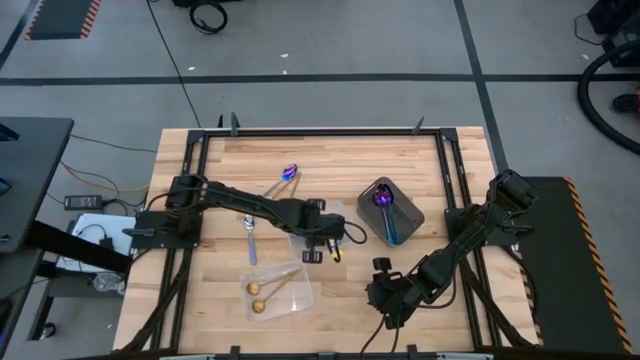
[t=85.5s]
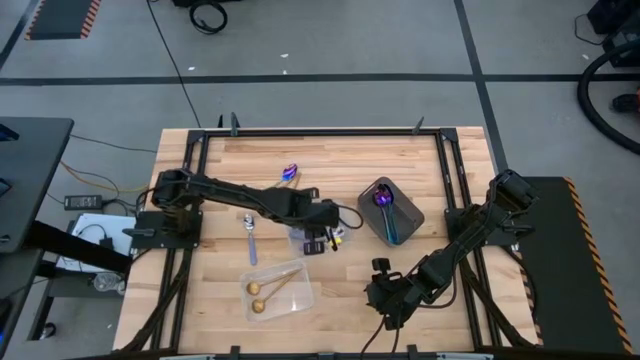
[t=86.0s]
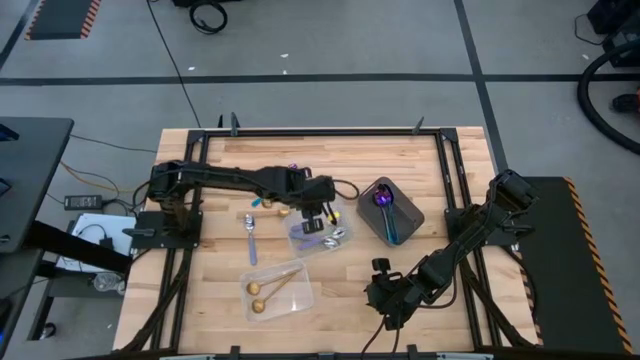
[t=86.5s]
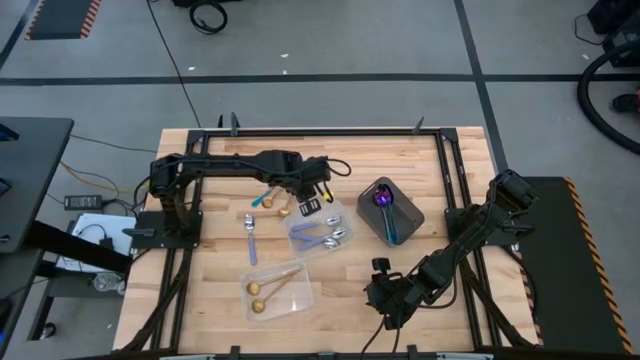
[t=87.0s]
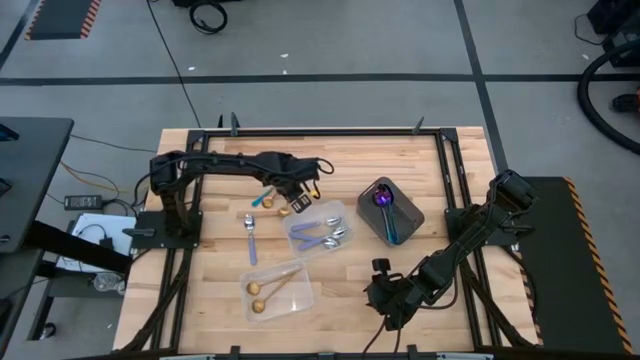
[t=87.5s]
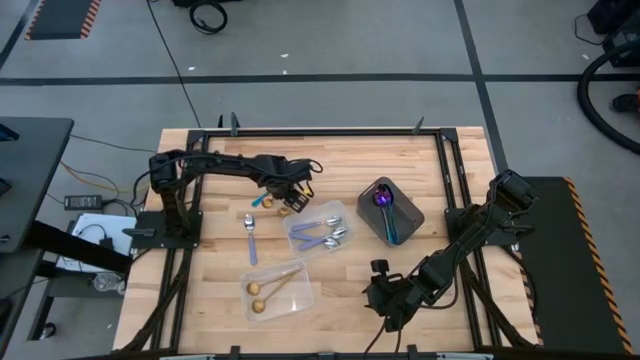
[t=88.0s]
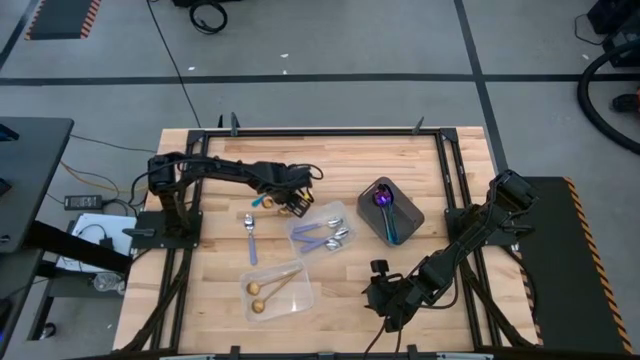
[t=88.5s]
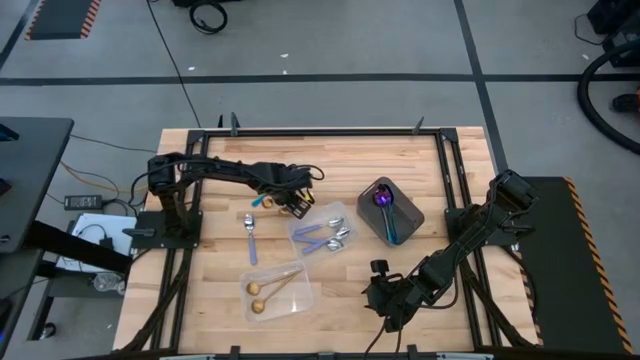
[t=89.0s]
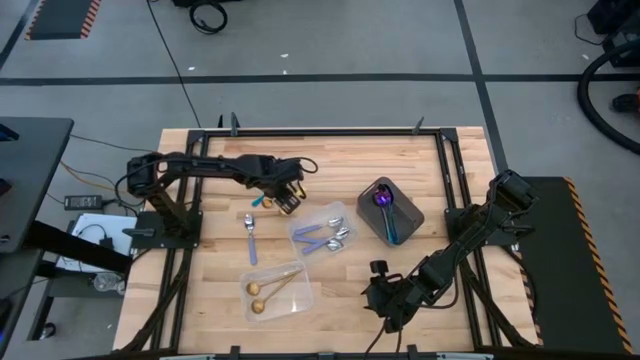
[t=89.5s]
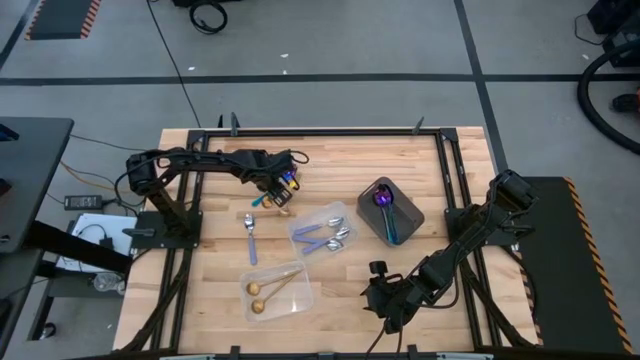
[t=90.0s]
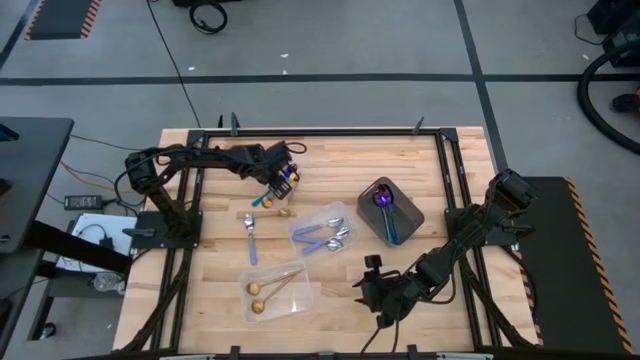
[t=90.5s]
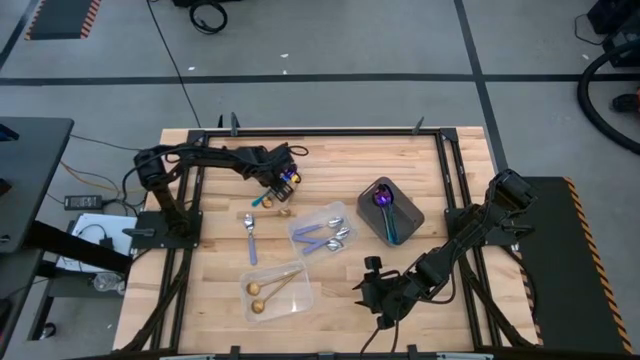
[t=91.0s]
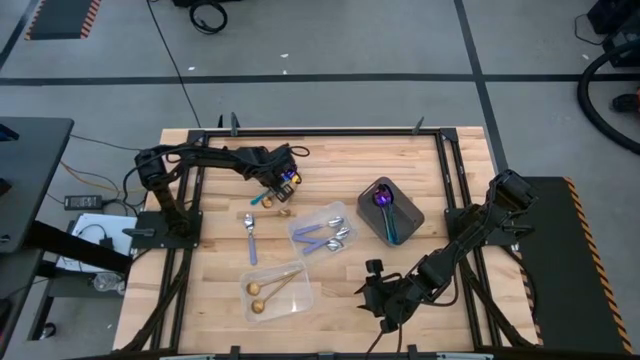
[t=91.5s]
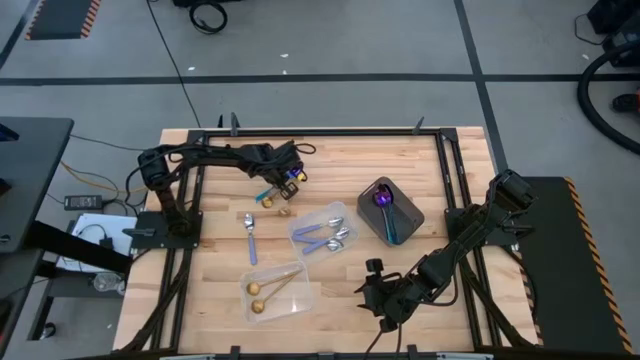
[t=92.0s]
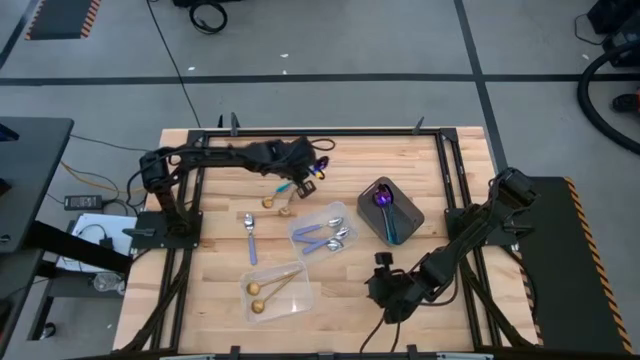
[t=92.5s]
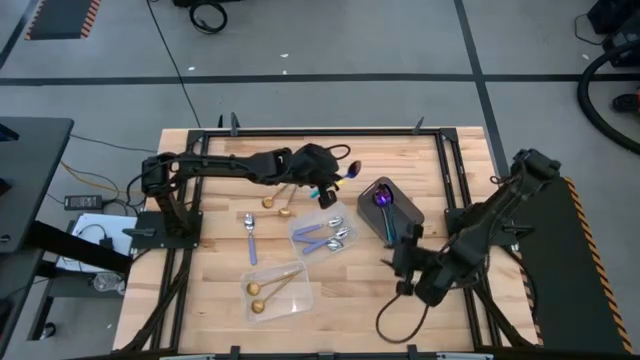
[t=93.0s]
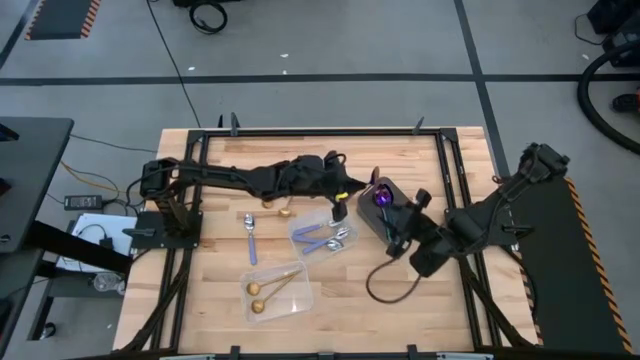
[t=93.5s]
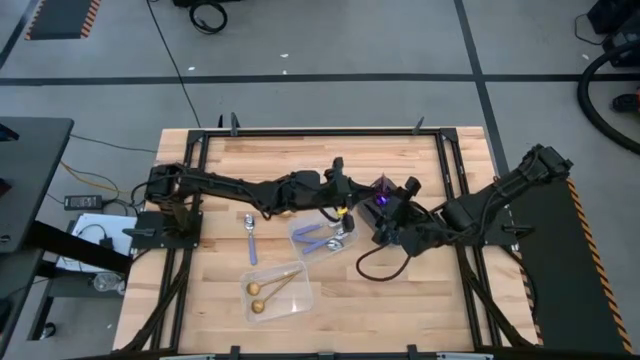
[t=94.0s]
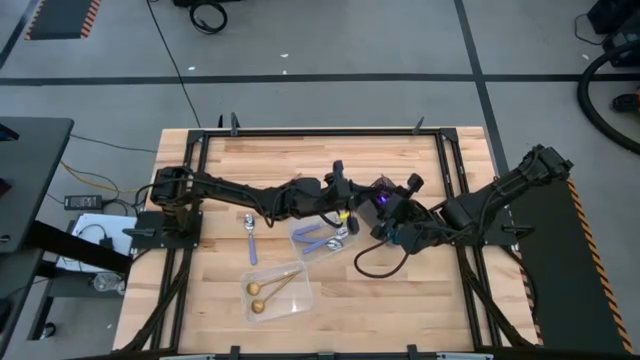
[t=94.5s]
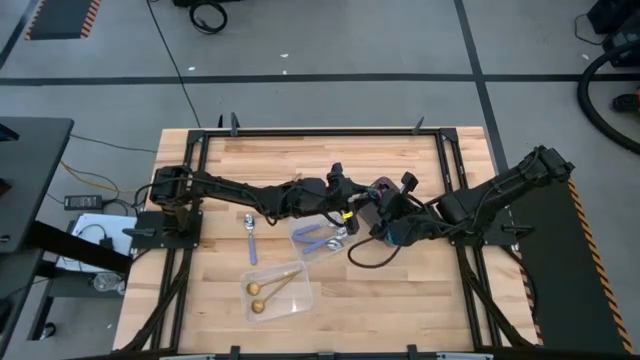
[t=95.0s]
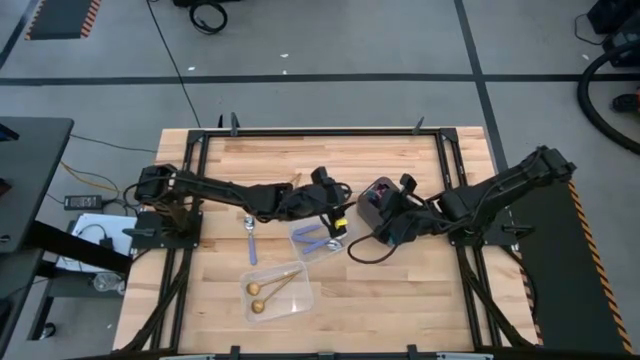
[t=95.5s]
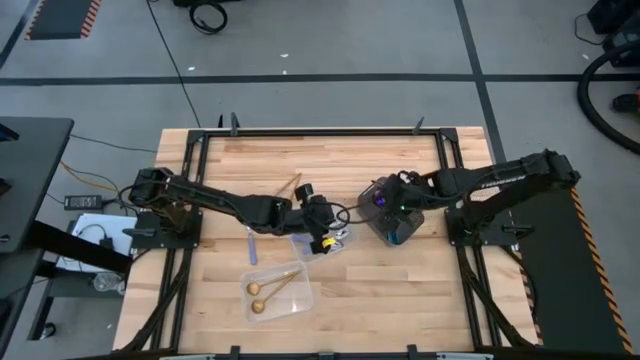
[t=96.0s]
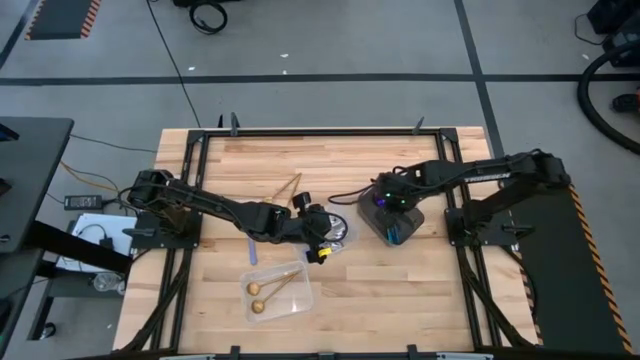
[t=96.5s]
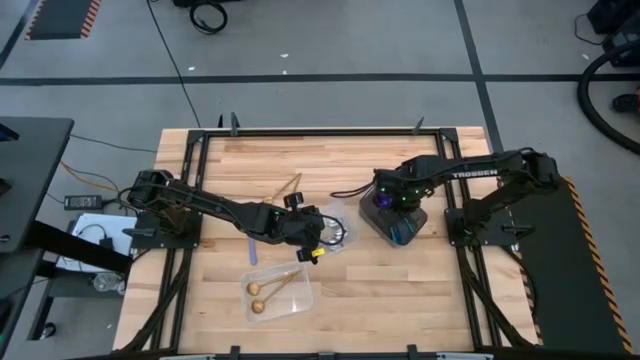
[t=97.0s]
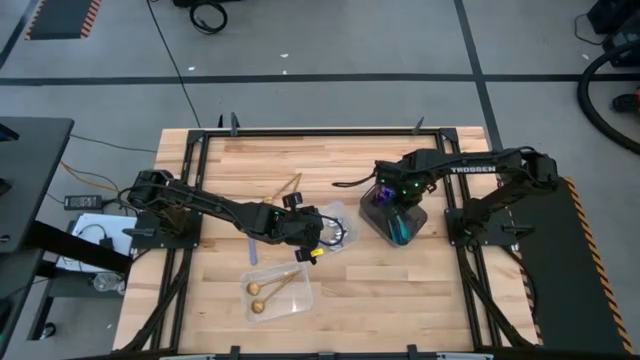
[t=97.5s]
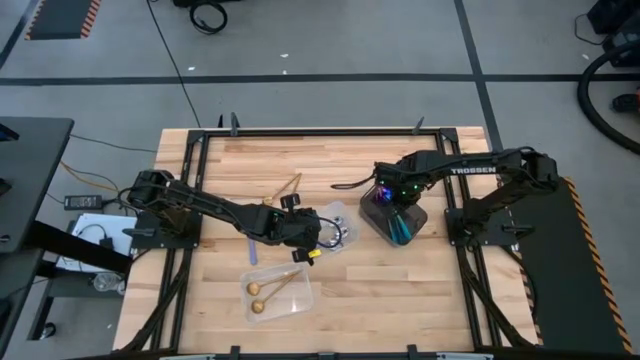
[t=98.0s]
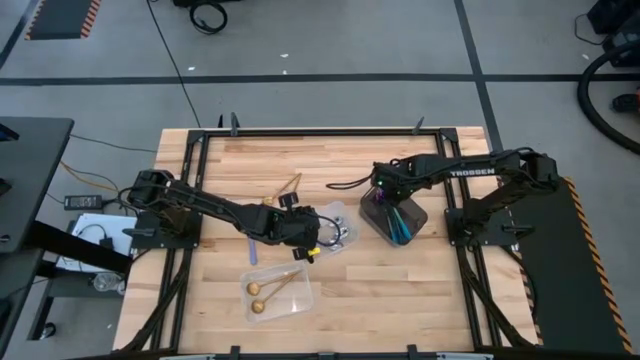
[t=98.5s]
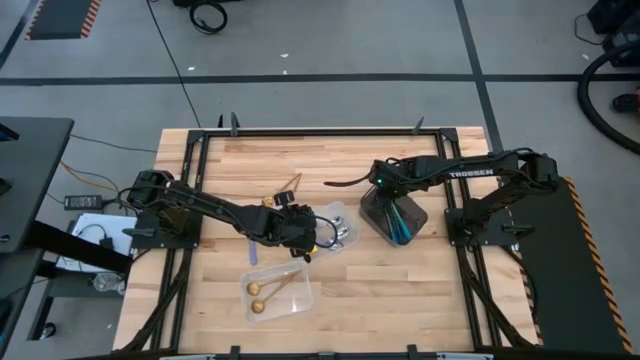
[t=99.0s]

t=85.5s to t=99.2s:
Task: Sort silverware by color (type)
Put the blue spoon into the black transparent bin

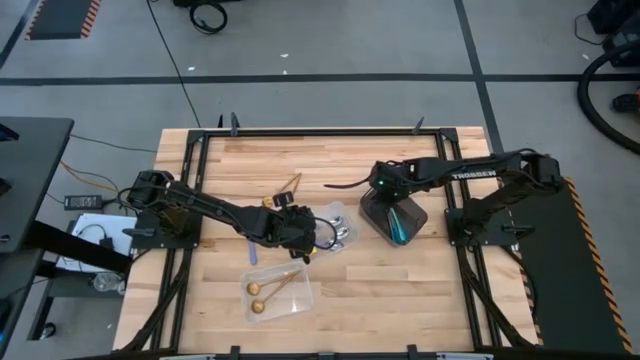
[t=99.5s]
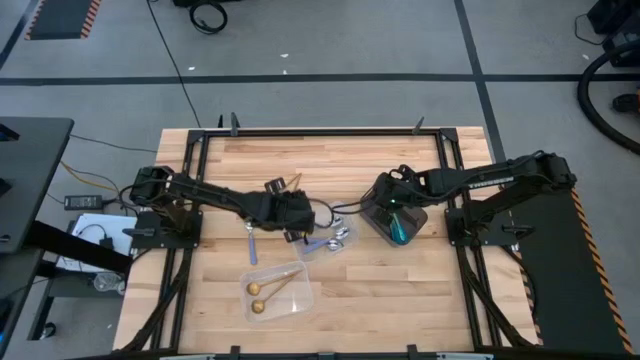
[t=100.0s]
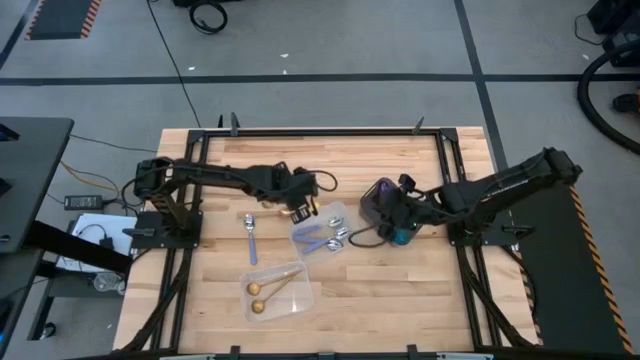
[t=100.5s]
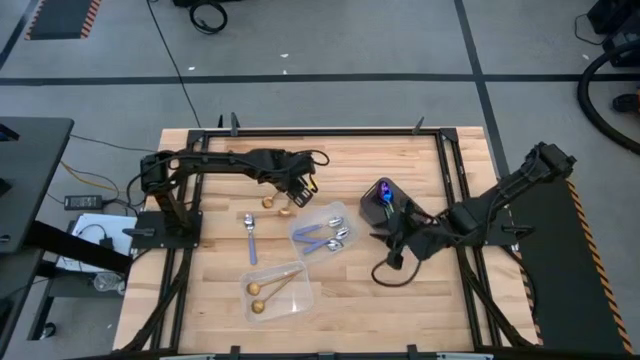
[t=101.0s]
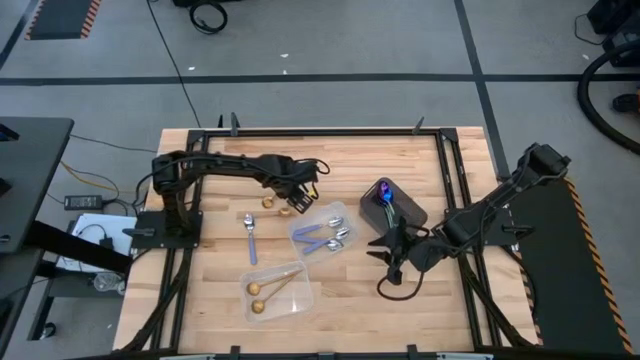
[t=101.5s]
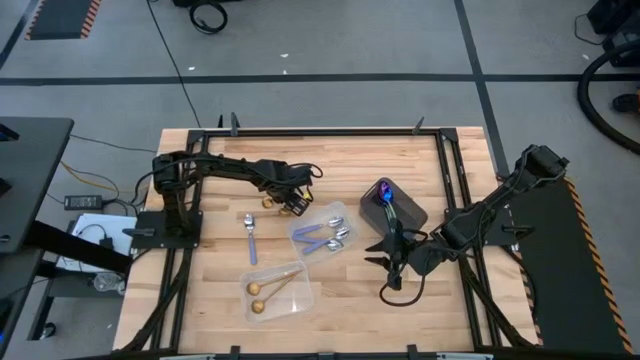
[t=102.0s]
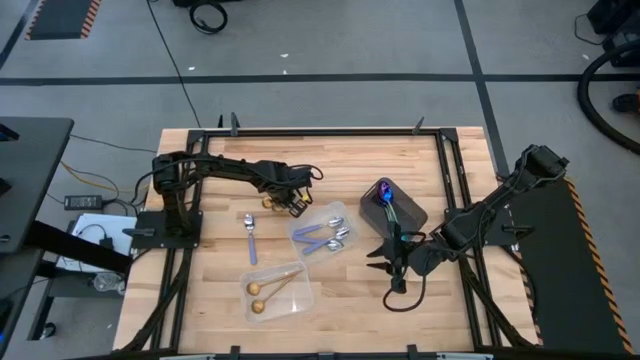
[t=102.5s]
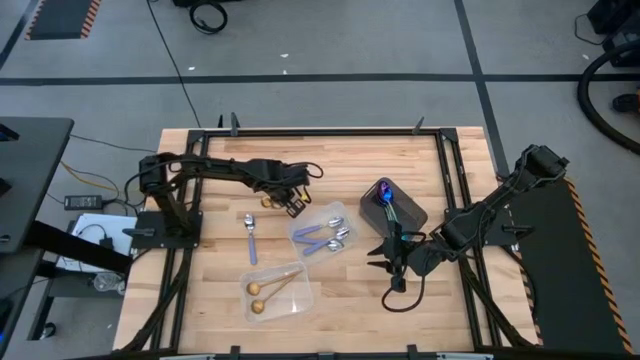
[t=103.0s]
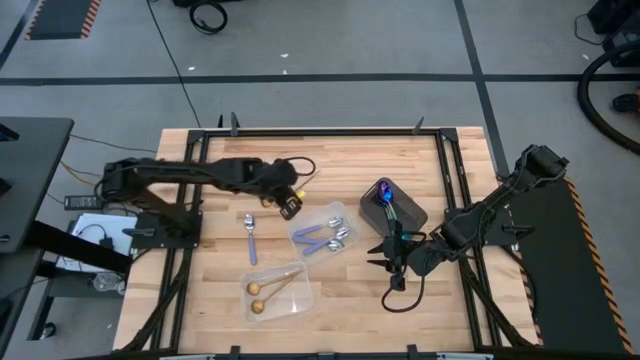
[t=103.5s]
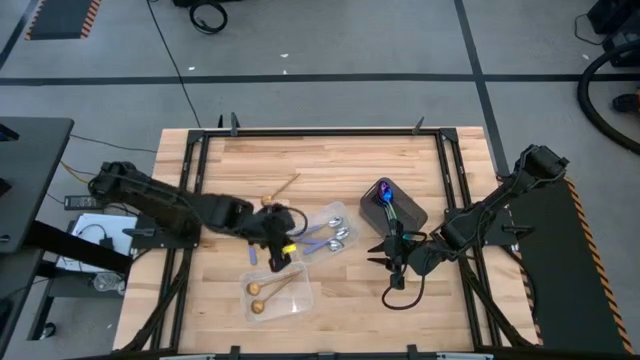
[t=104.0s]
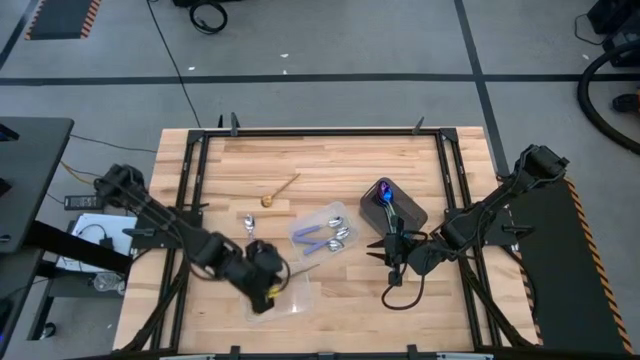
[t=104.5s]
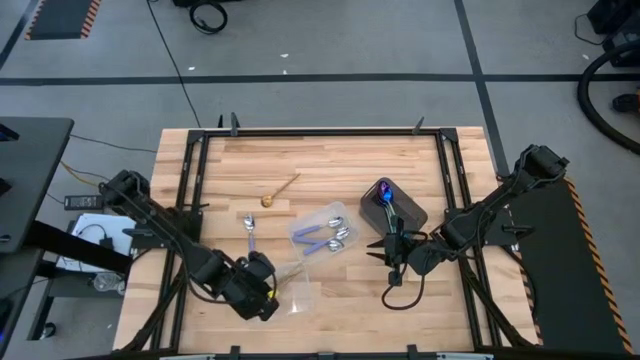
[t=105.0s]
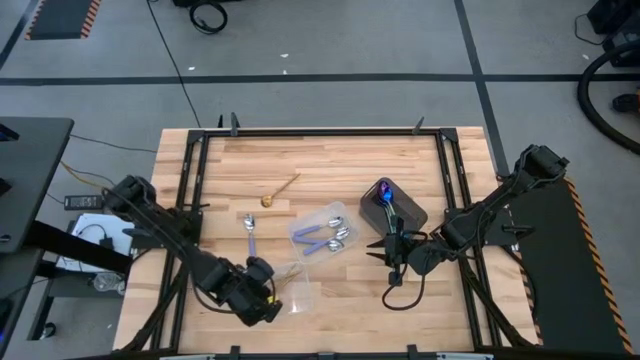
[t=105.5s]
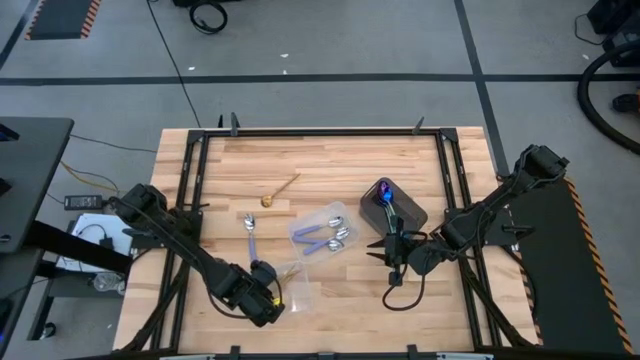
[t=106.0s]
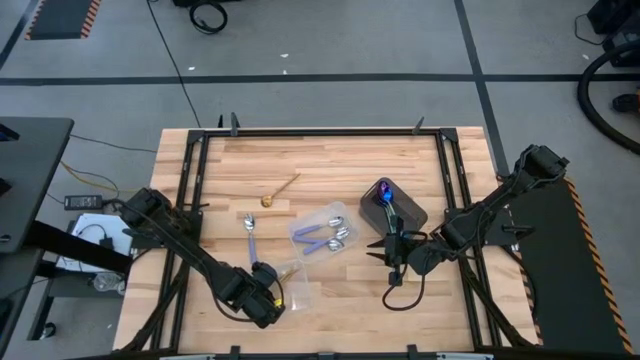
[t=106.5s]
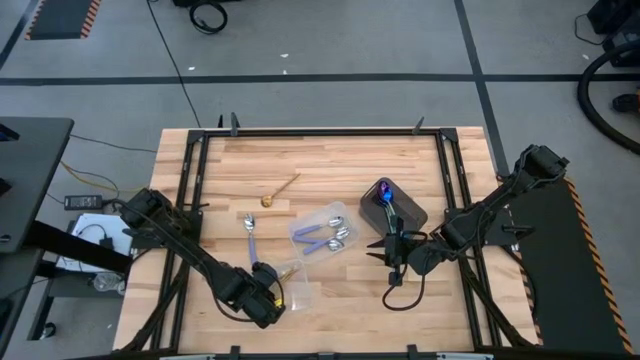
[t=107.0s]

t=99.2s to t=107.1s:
Put the gold spoon into the bottom transparent bin
